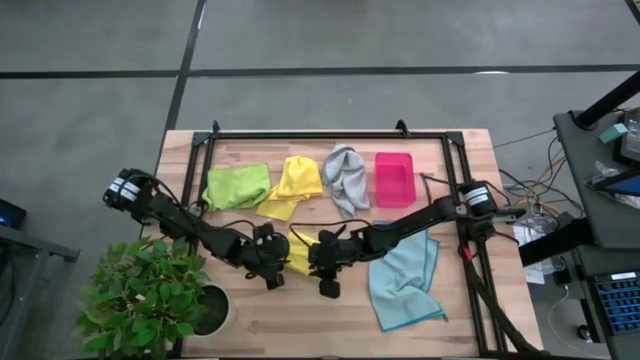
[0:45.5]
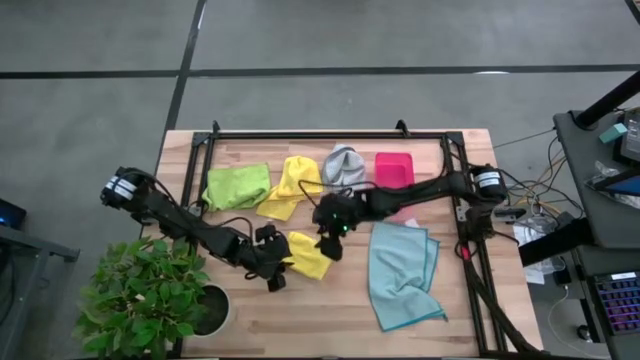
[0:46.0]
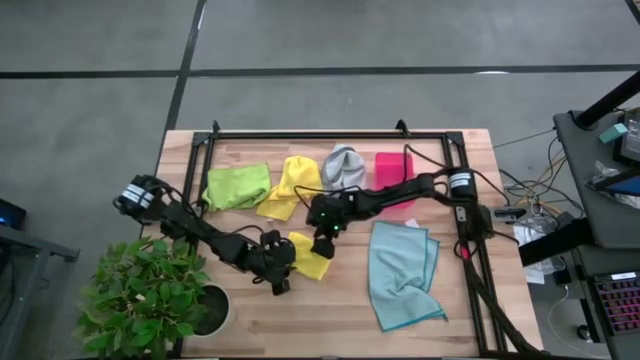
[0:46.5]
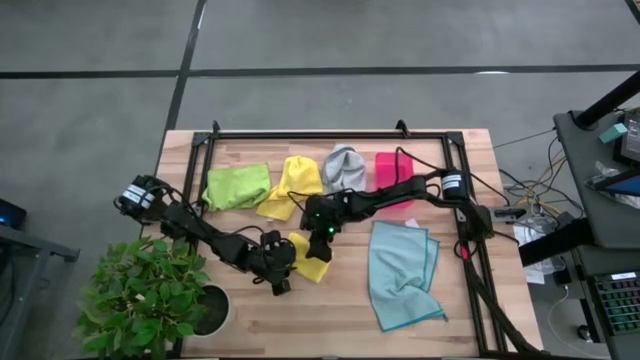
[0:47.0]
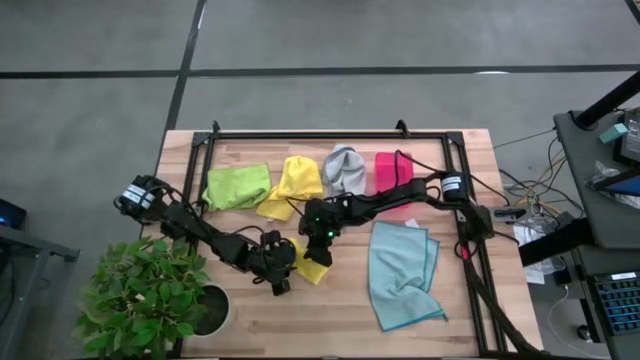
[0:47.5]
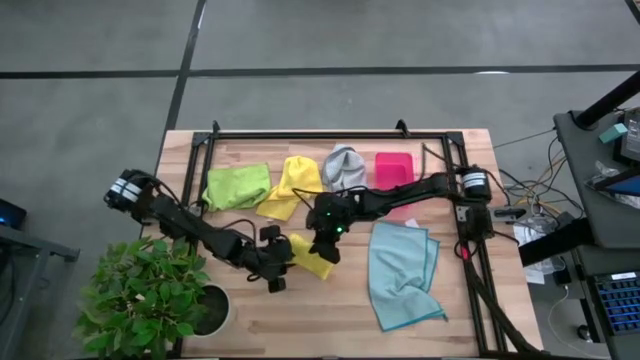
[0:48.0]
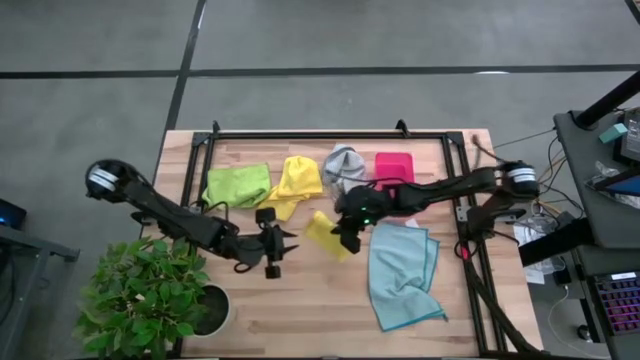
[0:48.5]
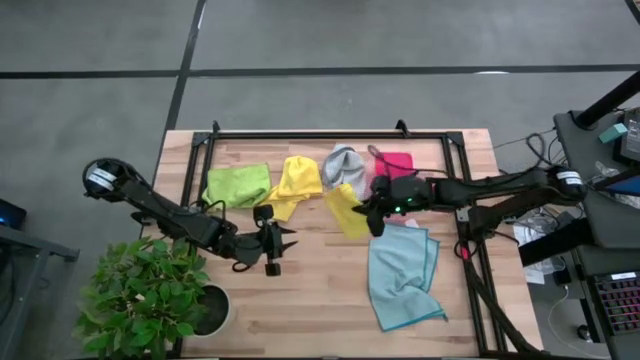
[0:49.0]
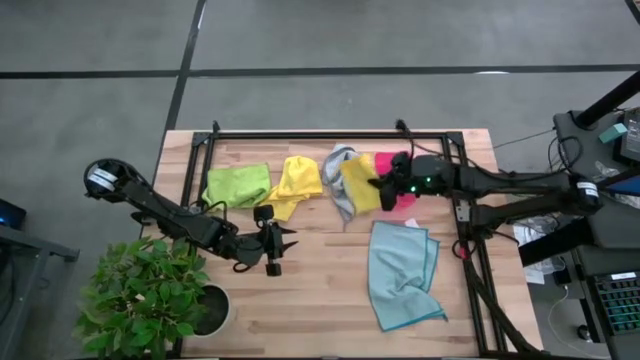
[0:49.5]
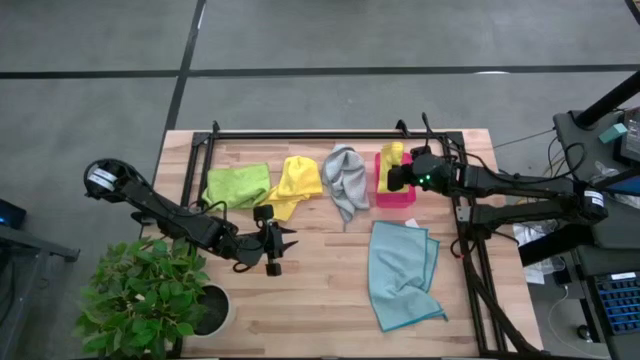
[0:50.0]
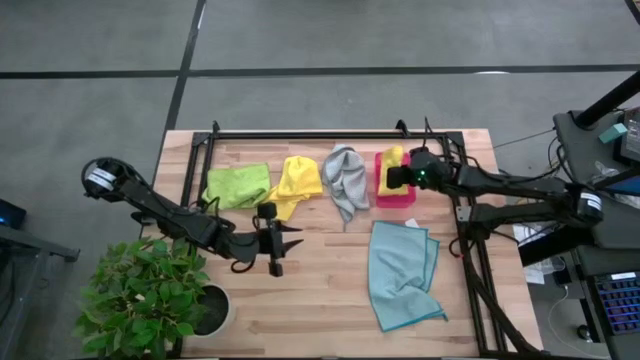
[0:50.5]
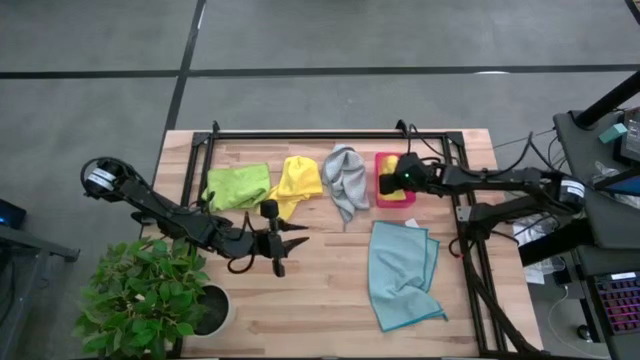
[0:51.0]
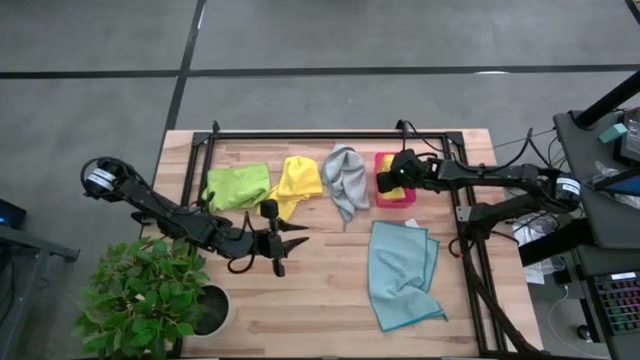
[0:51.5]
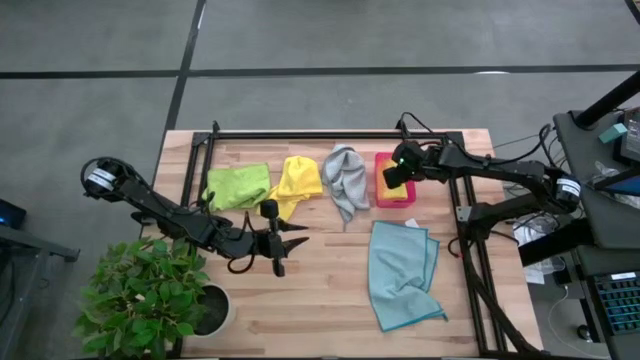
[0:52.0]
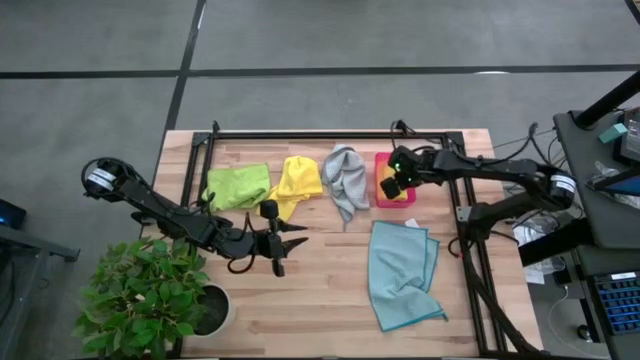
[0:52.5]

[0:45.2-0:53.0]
Task: Fold microfiber towels
Put the folded yellow microfiber towel into the red bin

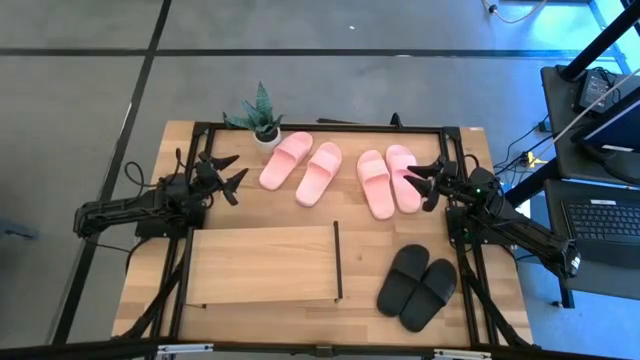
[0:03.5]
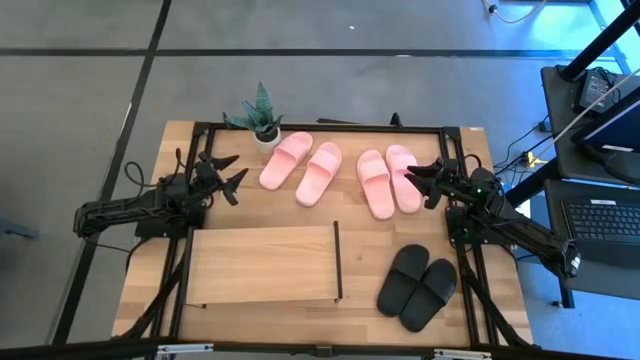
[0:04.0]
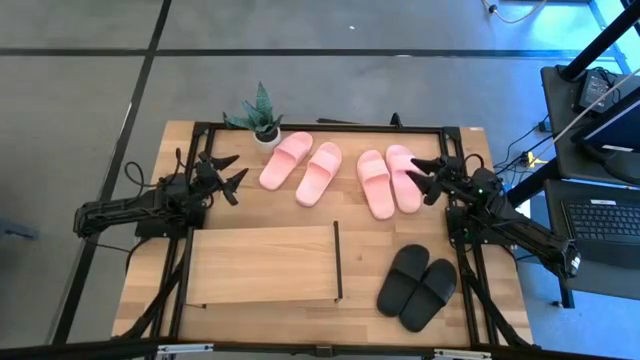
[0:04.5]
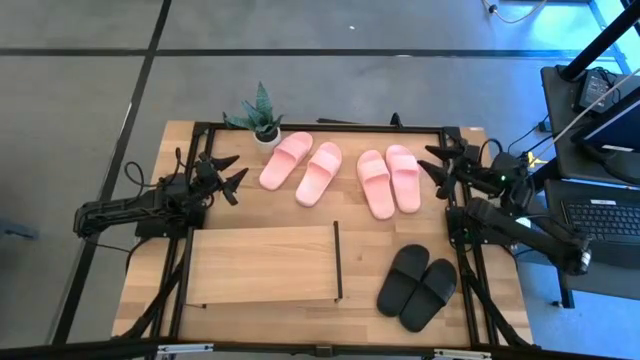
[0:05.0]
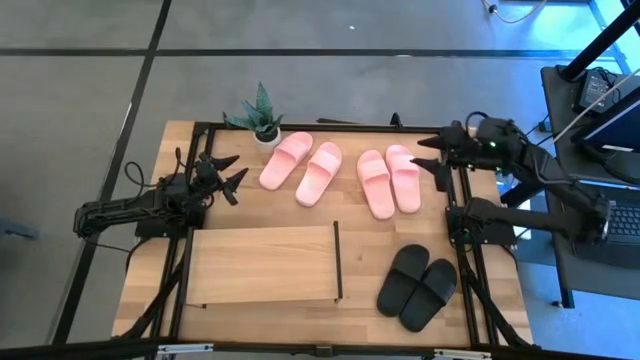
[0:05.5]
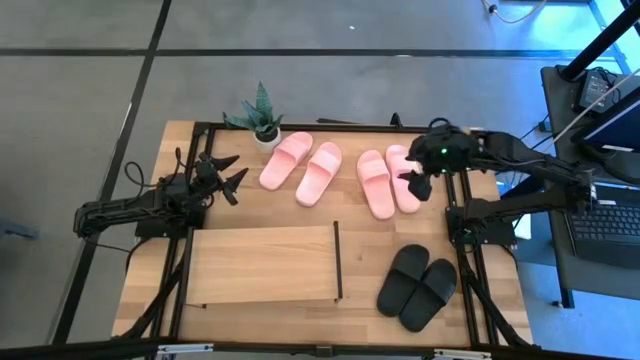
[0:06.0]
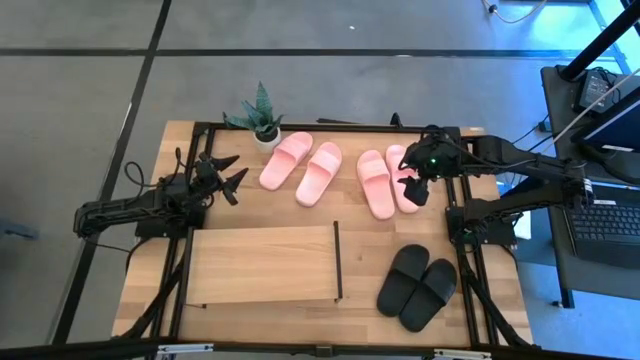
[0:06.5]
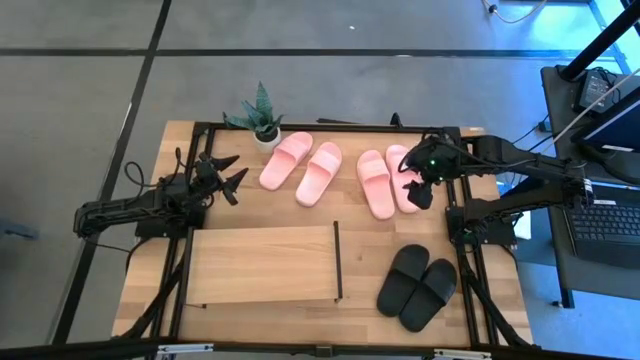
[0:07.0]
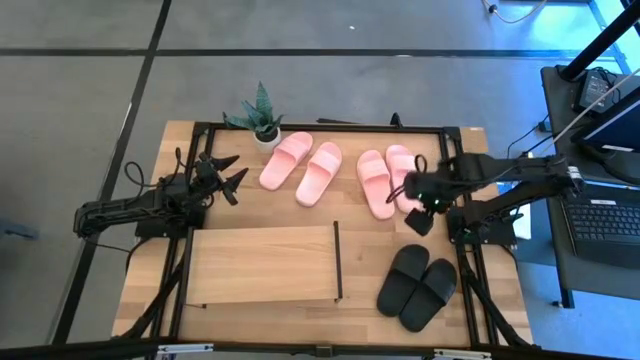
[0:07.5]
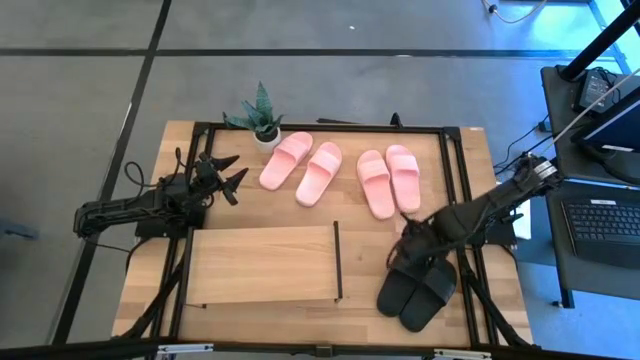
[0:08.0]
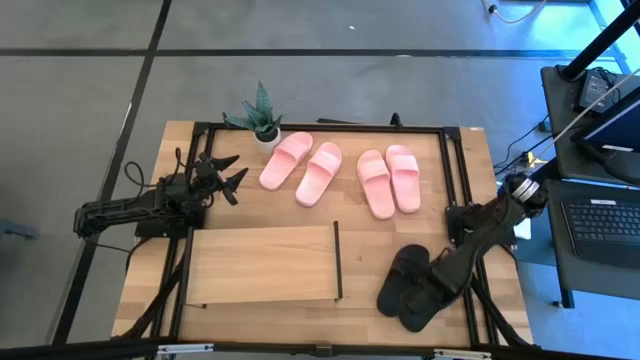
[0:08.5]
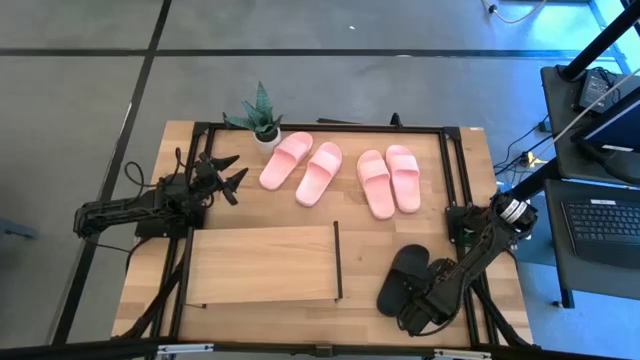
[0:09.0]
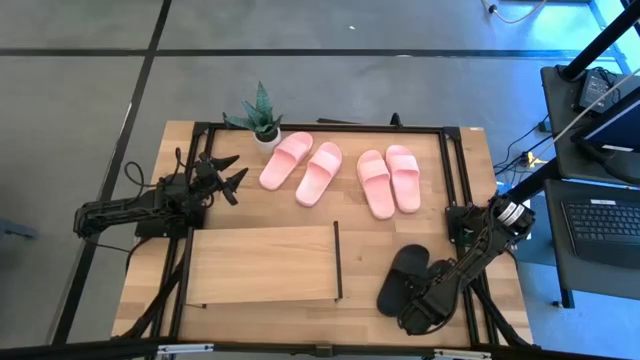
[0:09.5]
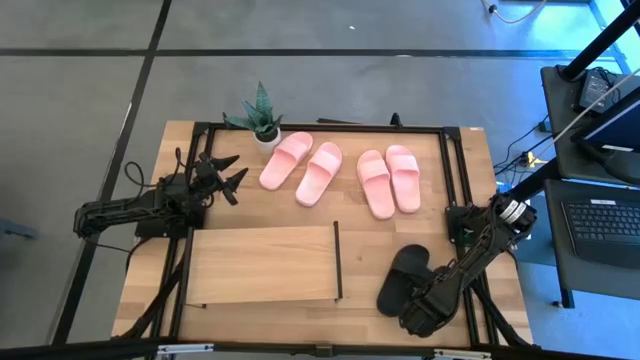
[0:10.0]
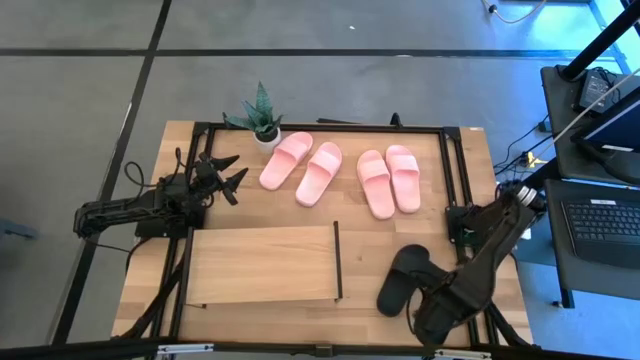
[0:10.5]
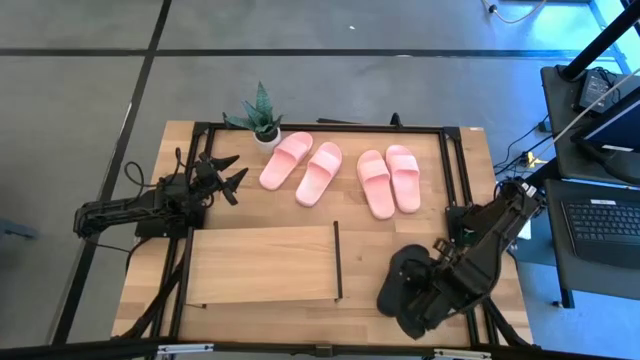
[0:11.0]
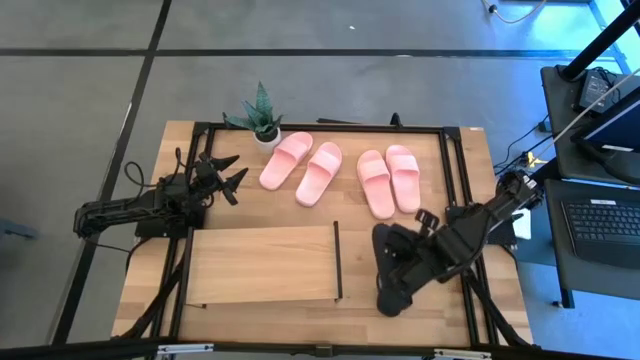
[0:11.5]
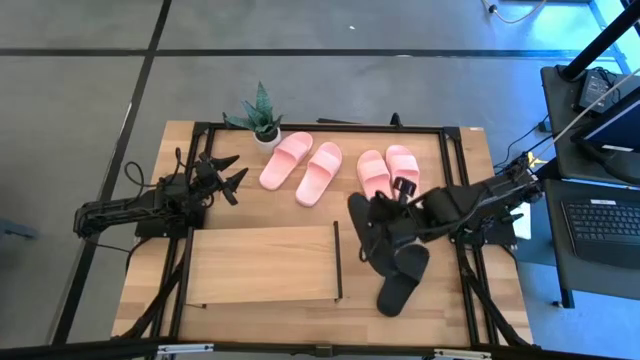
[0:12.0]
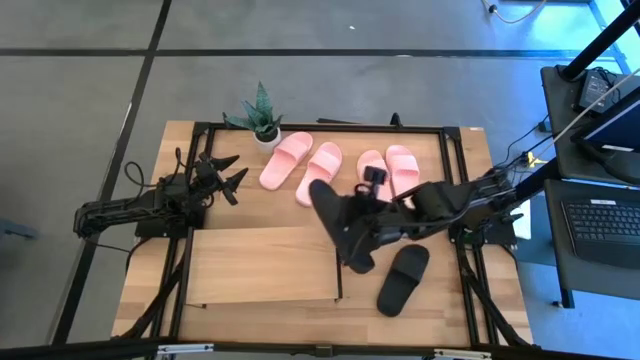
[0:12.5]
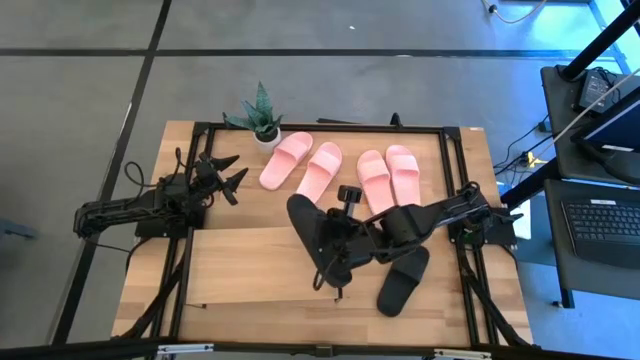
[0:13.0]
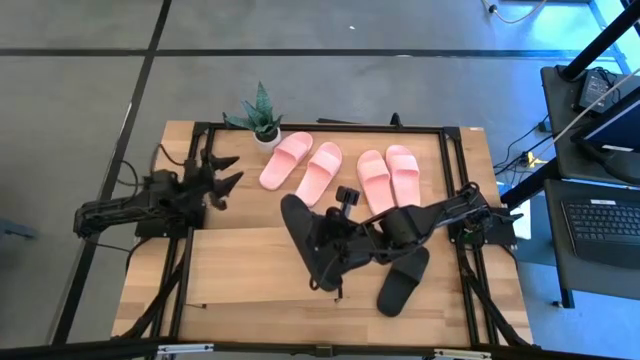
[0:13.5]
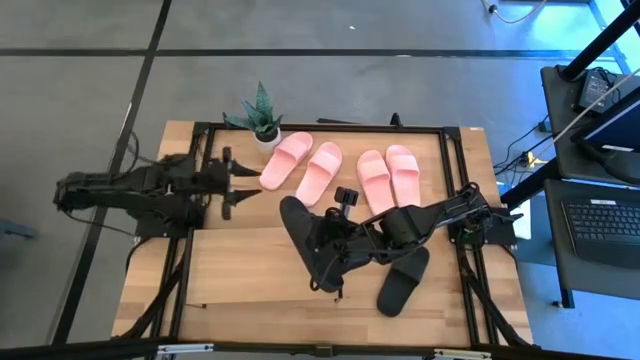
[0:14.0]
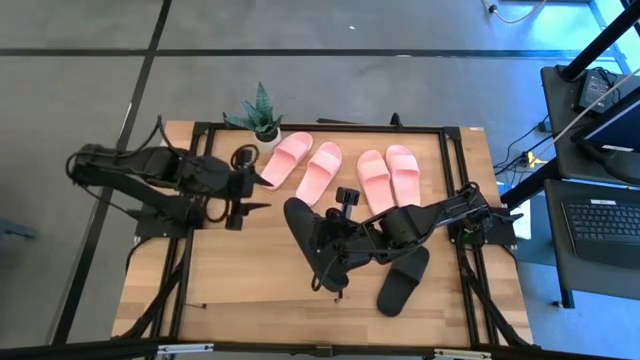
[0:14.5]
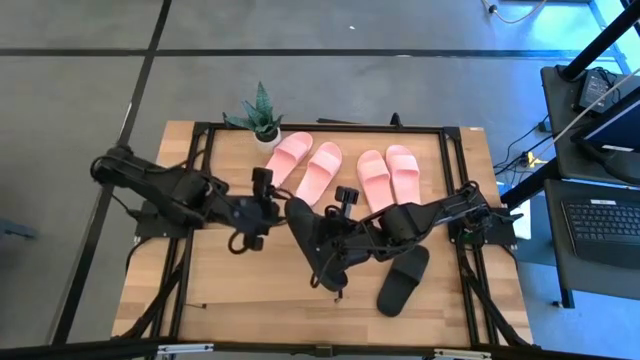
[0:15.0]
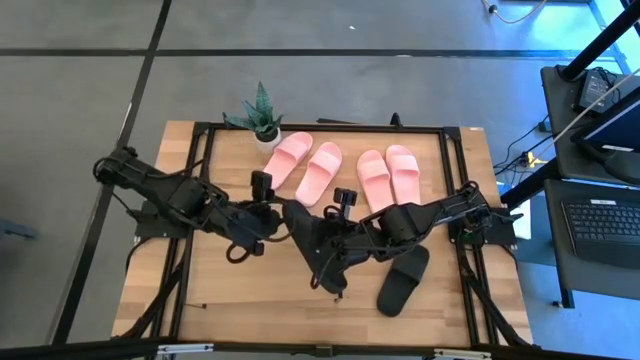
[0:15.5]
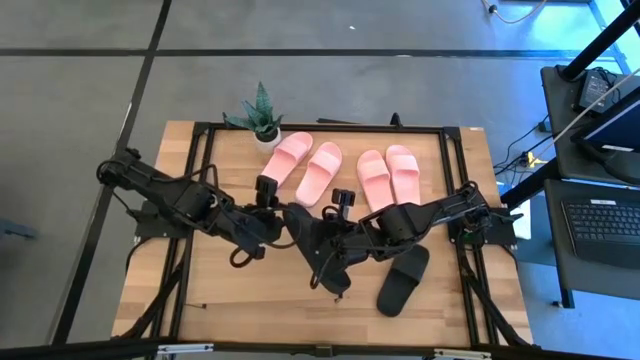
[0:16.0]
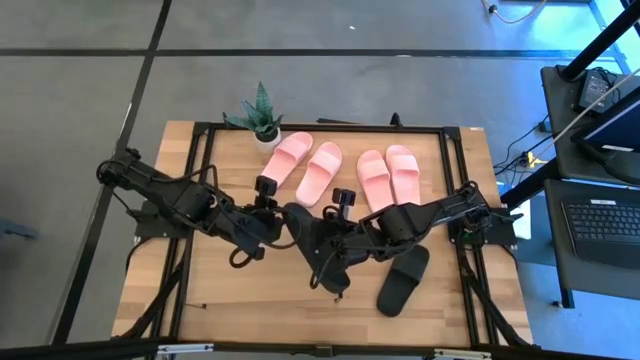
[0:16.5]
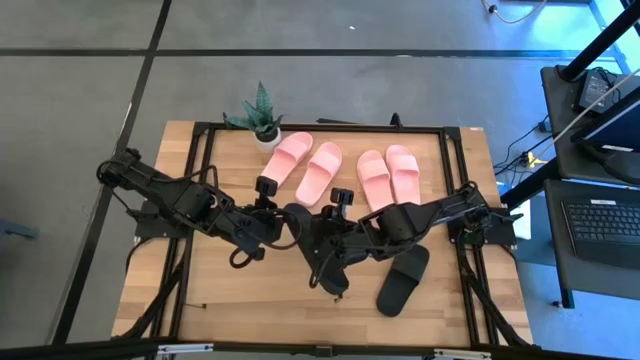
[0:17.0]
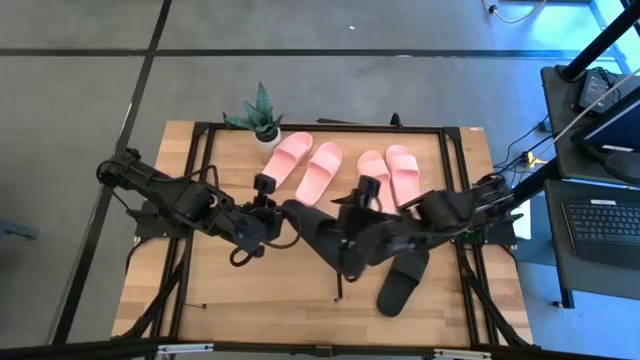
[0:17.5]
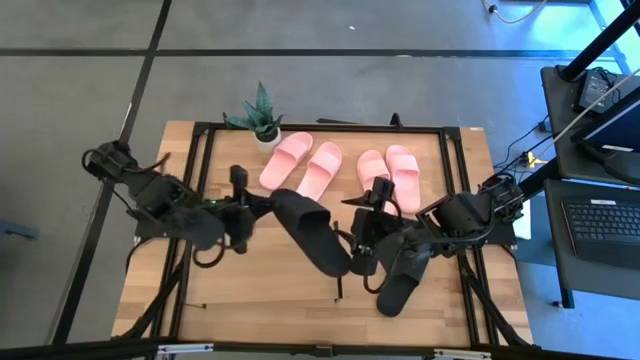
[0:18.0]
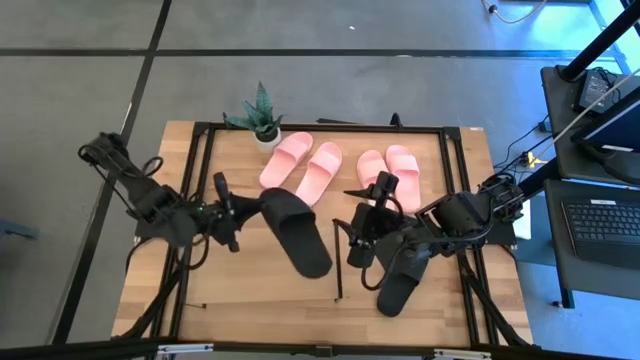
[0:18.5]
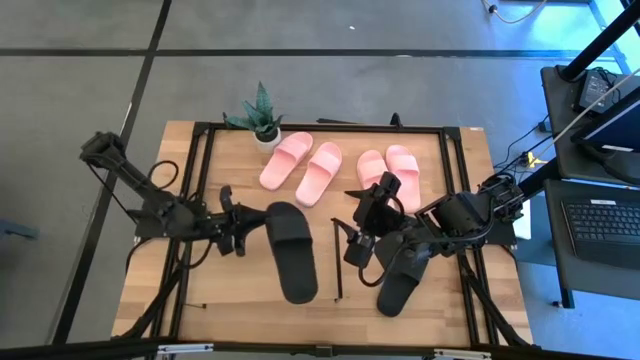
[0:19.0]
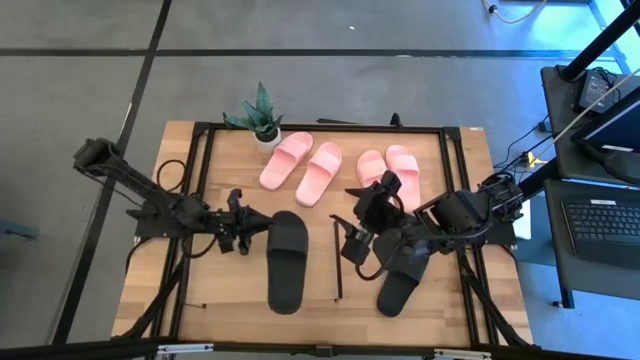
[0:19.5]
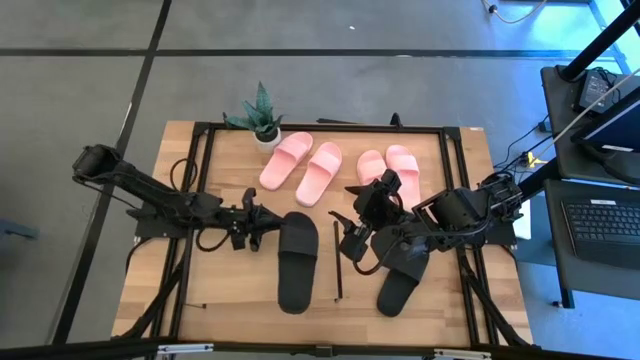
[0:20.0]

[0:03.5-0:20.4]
Task: Pick and place slides into the shelf
Put the black slide on the shelf
